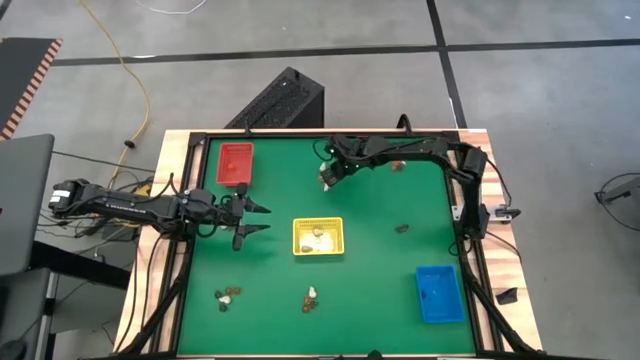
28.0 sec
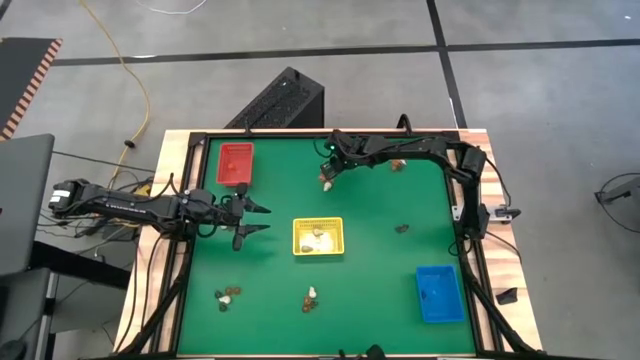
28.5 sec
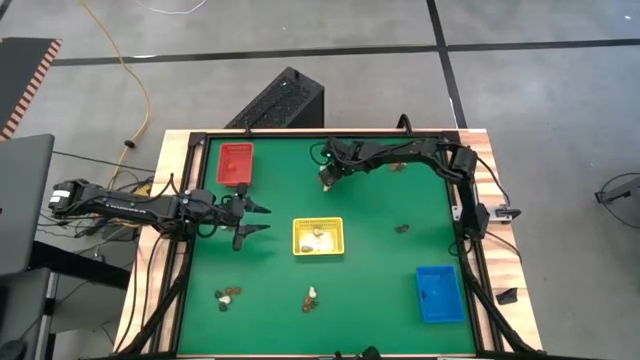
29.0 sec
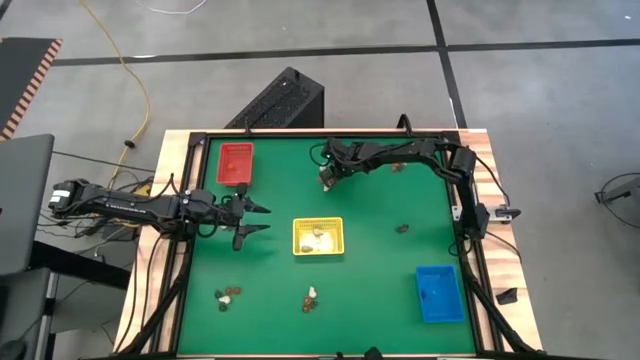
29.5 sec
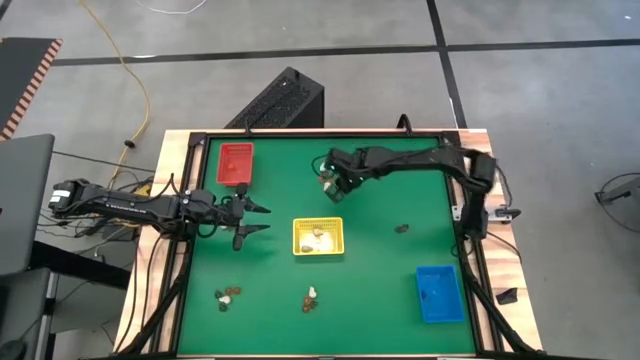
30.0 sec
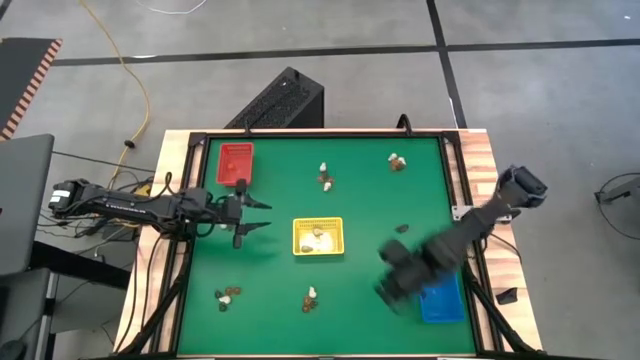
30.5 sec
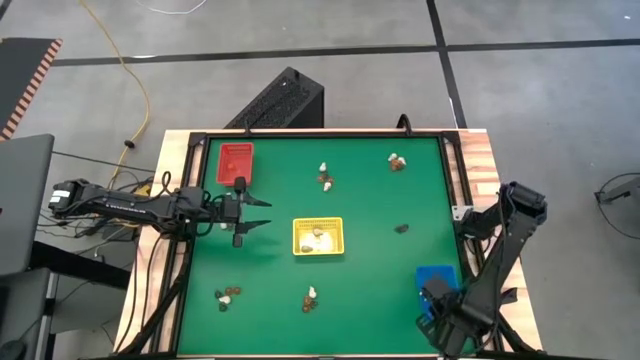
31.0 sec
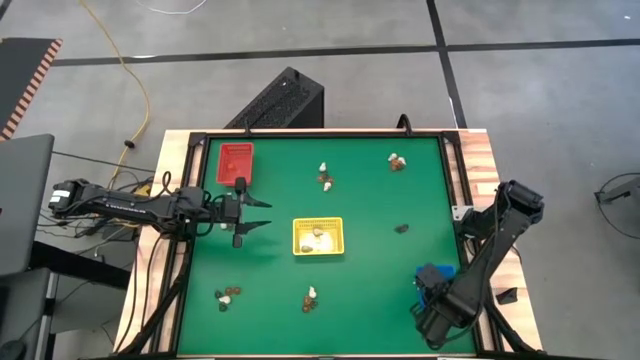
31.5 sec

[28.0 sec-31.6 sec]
Task: Sort Halloween decoration
Put the black skull toy into the blue bin

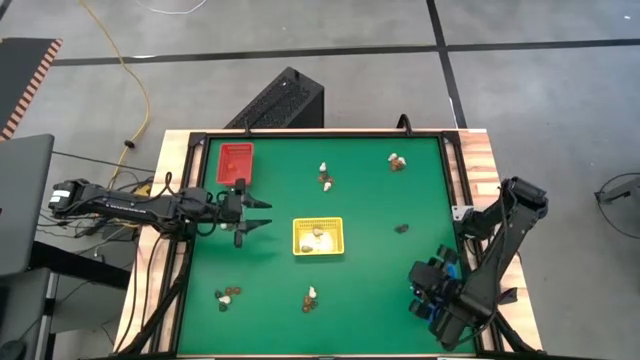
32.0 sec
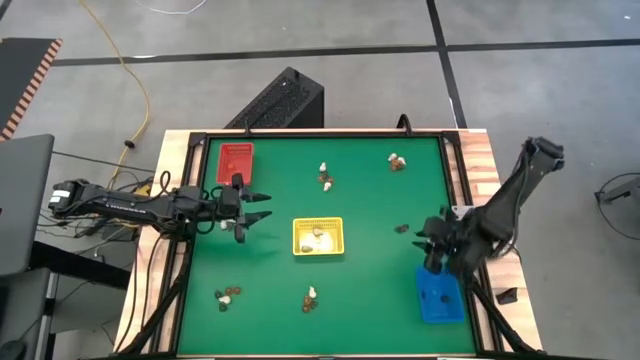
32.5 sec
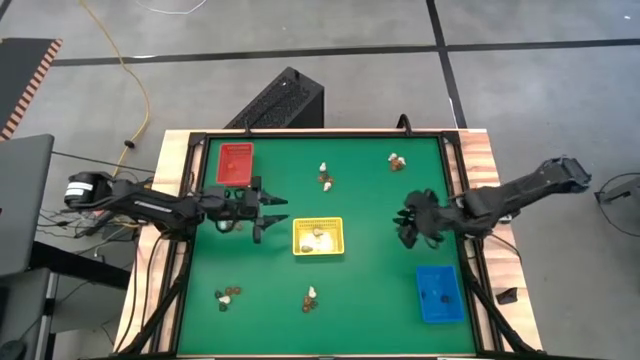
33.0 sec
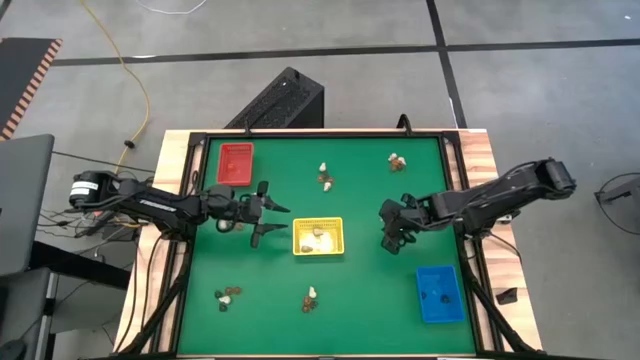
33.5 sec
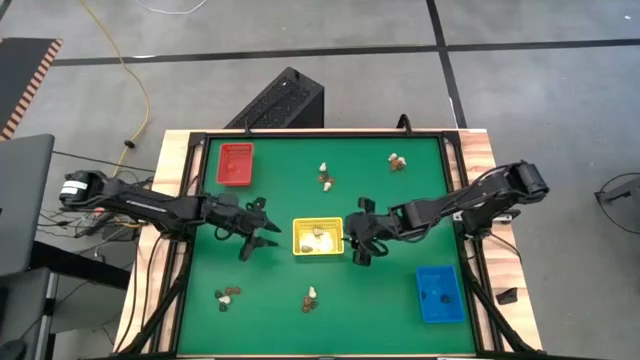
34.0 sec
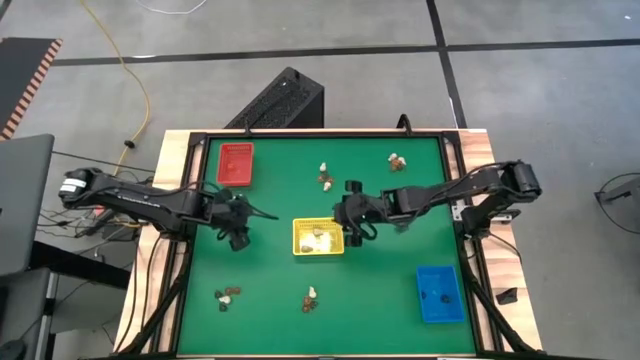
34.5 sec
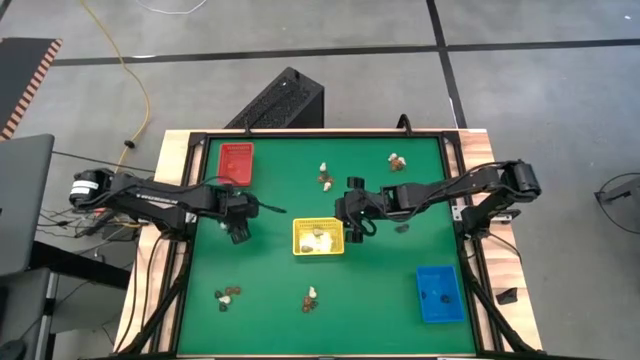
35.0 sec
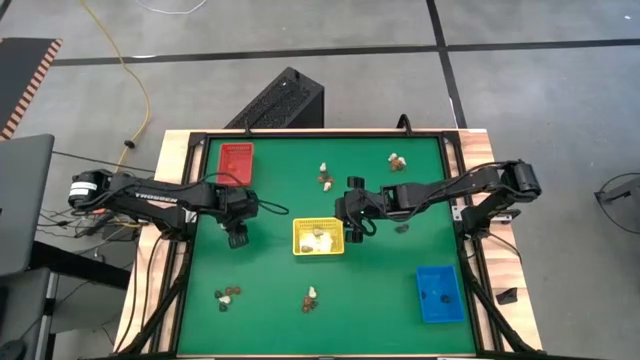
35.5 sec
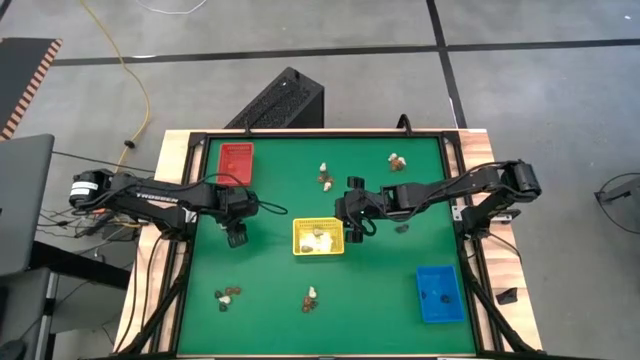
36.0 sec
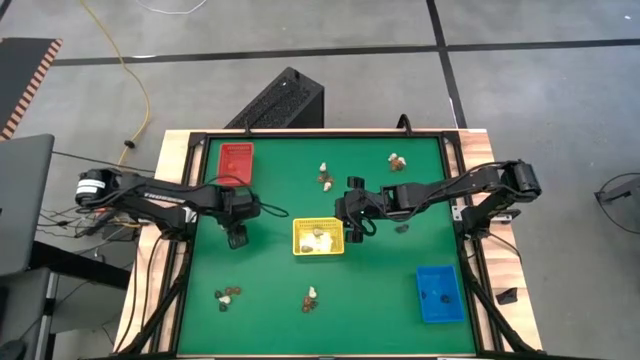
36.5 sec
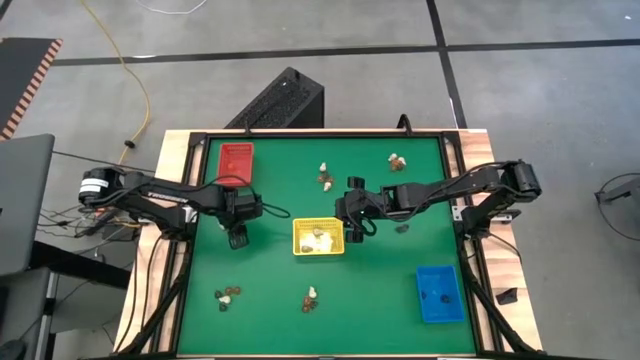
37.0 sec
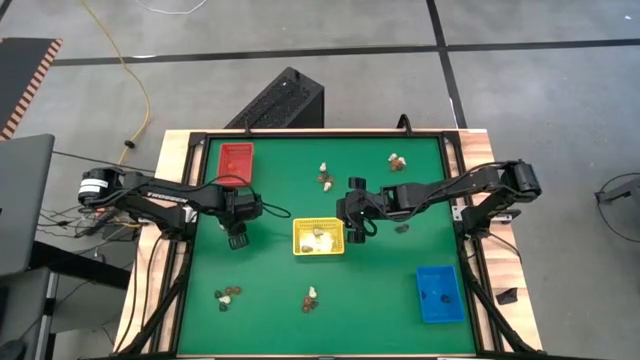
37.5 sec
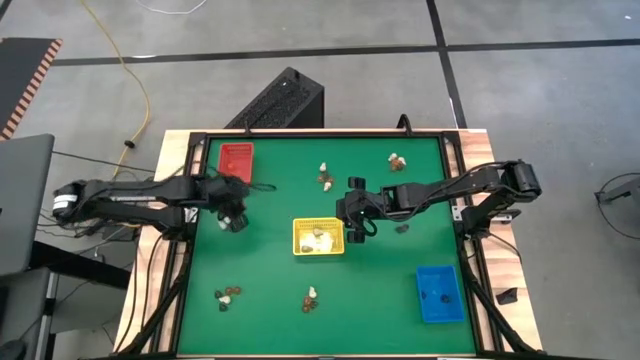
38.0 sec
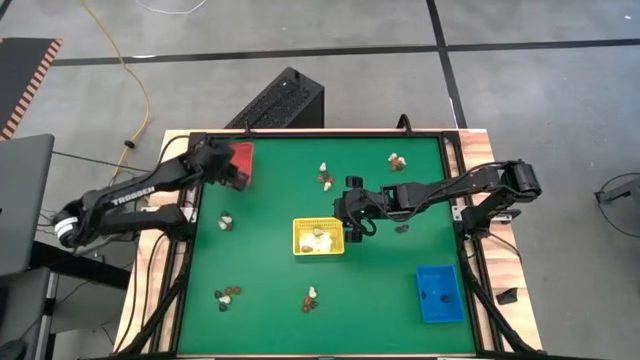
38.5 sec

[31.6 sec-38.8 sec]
Put the orange pumpkin toy into the red bin

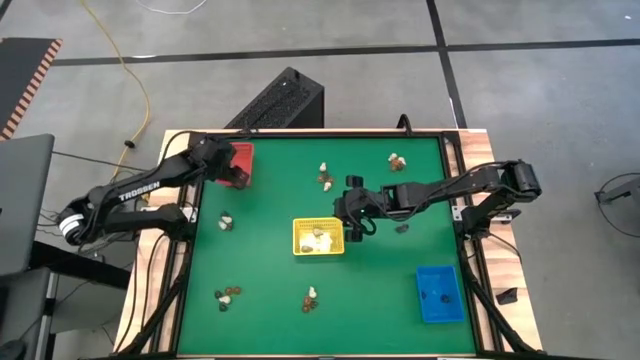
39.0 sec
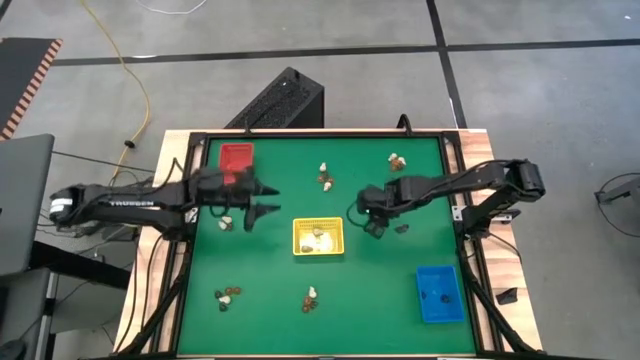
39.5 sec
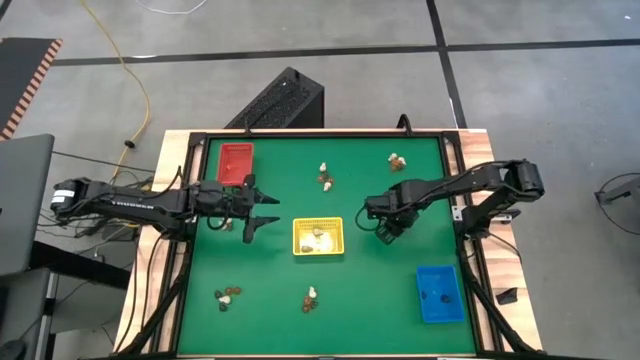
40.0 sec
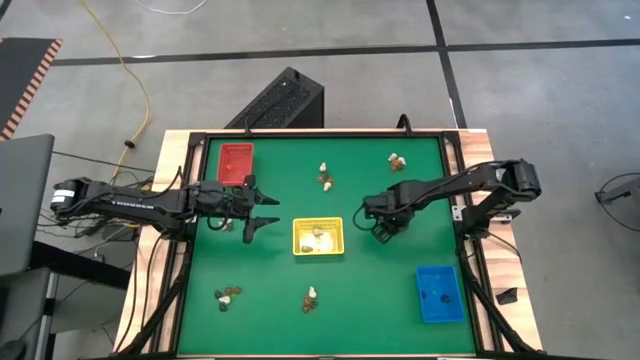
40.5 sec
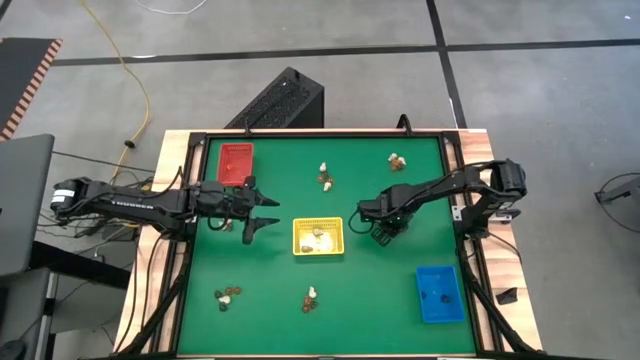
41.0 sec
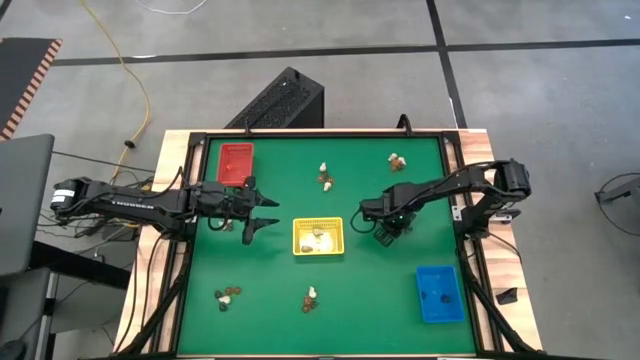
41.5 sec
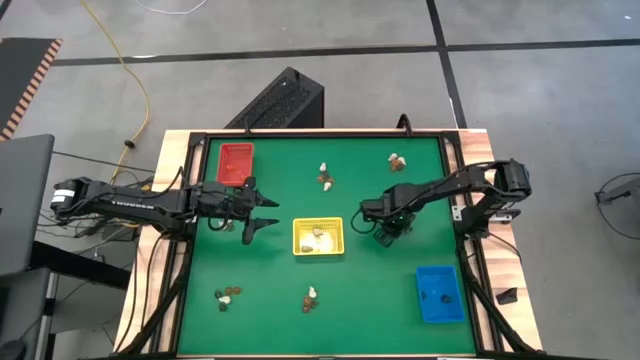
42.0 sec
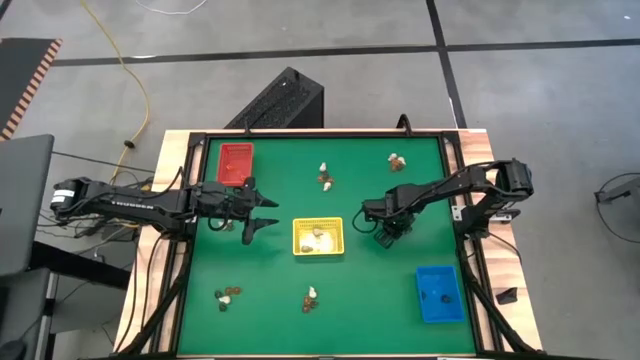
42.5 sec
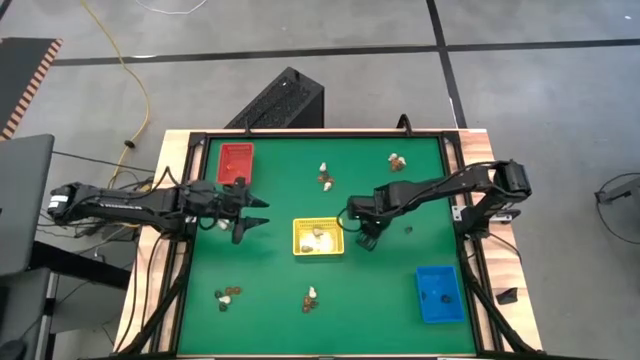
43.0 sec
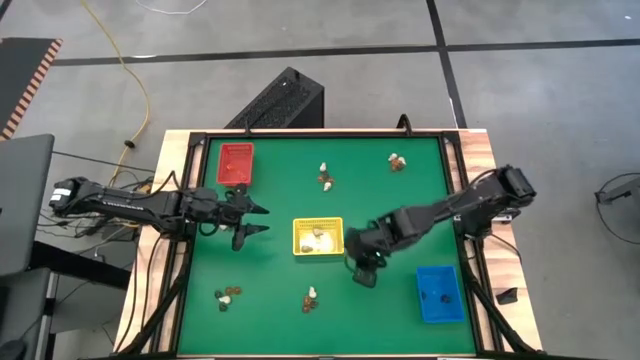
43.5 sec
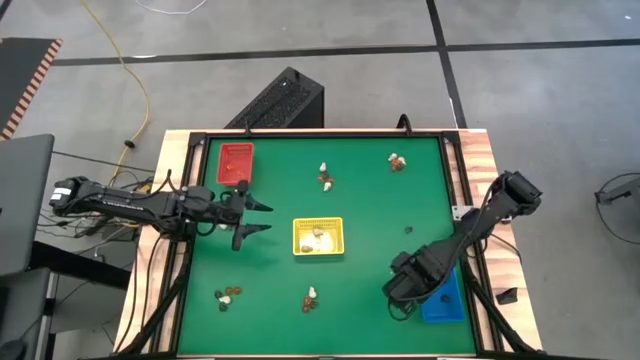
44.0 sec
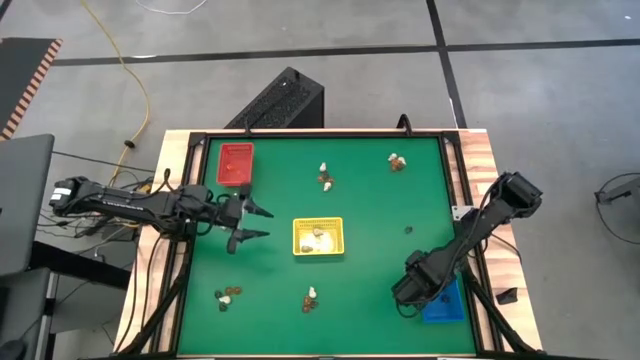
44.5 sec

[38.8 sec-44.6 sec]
Put the black skull toy into the blue bin

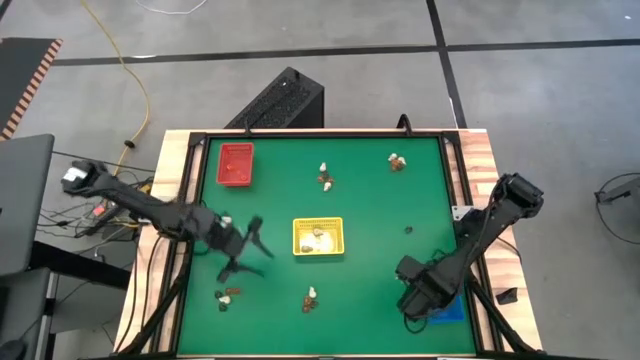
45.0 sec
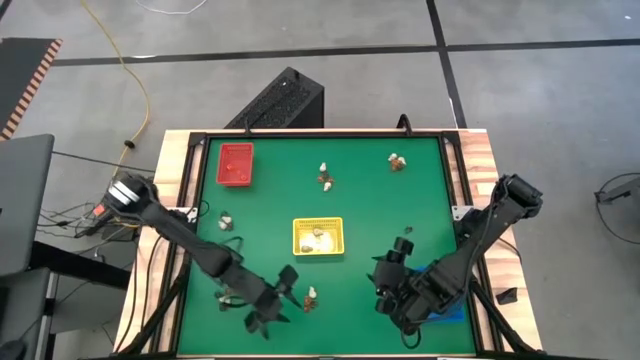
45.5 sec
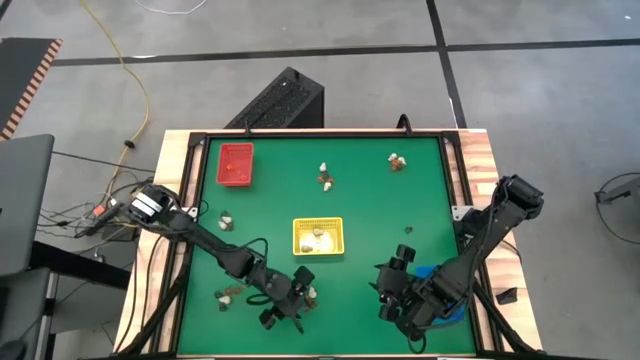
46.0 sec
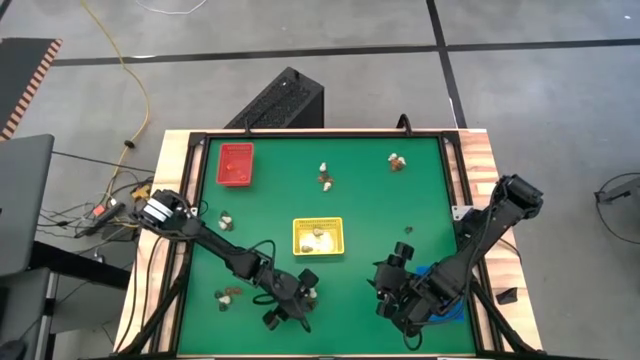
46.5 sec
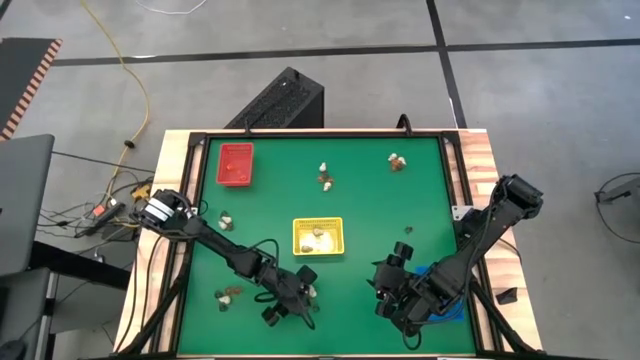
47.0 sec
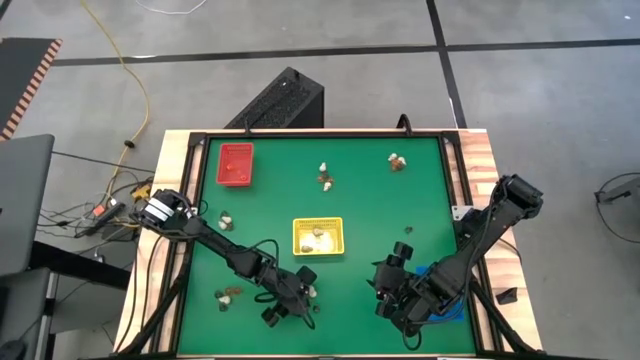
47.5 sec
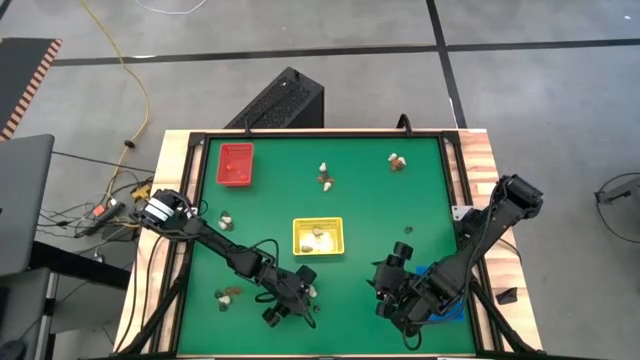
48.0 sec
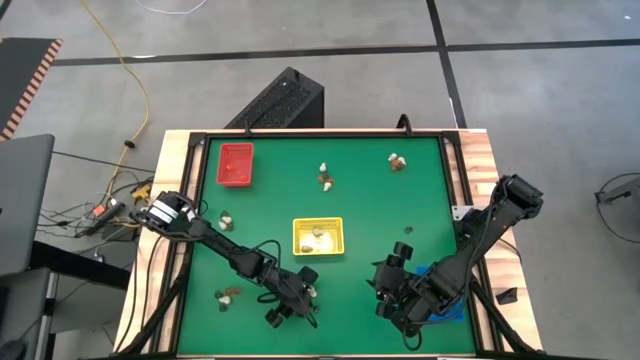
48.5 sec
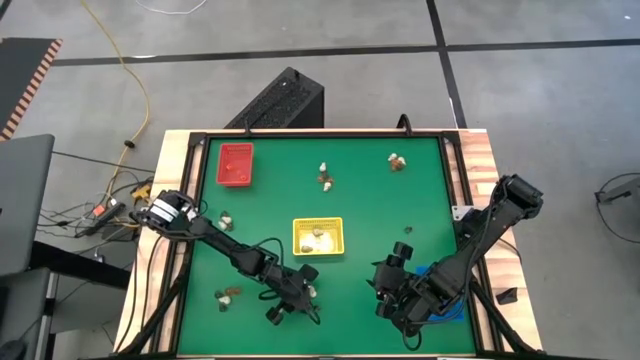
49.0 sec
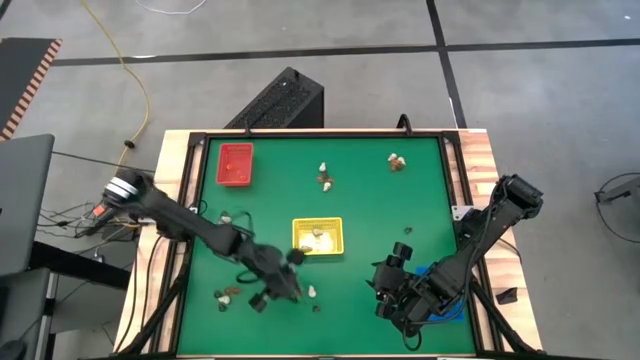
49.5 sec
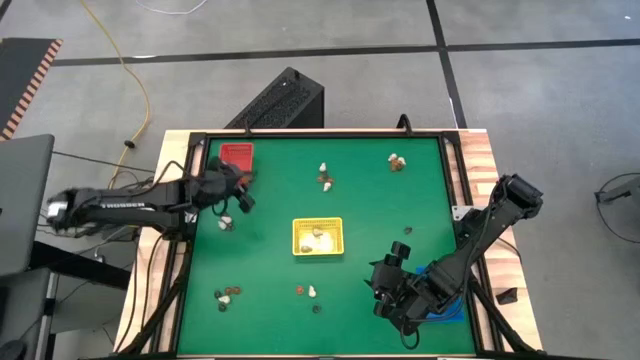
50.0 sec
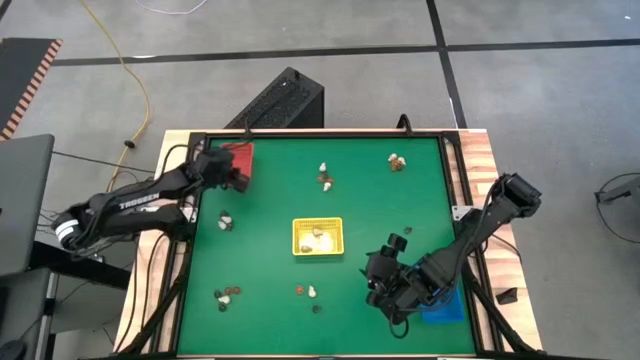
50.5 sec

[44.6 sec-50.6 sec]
Put the orange pumpkin toy into the red bin
